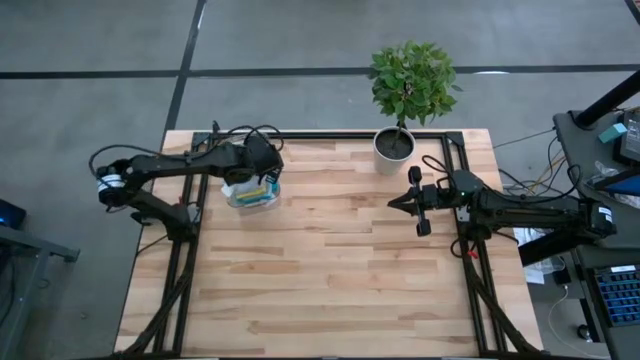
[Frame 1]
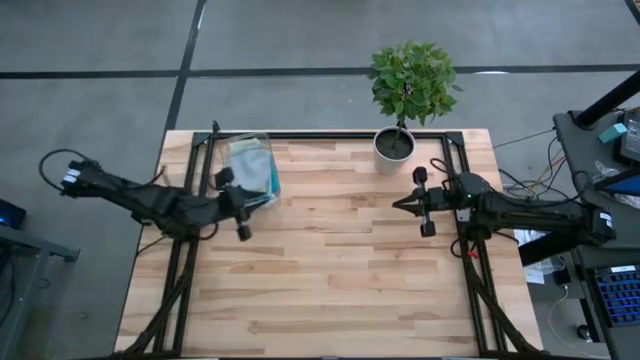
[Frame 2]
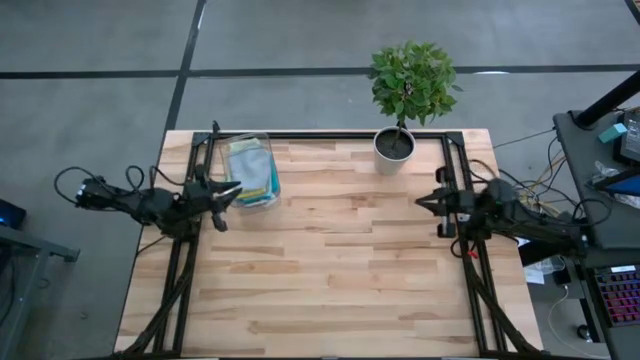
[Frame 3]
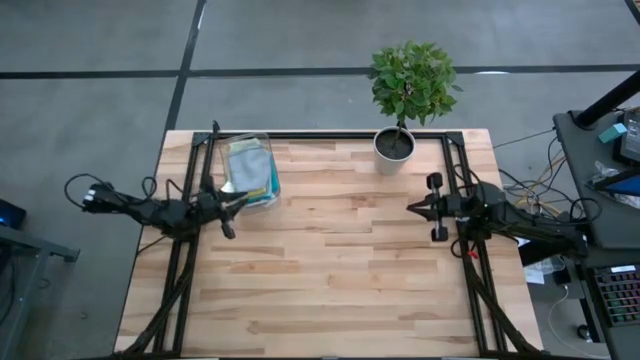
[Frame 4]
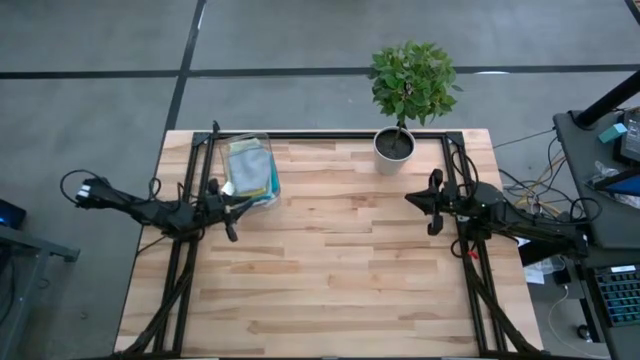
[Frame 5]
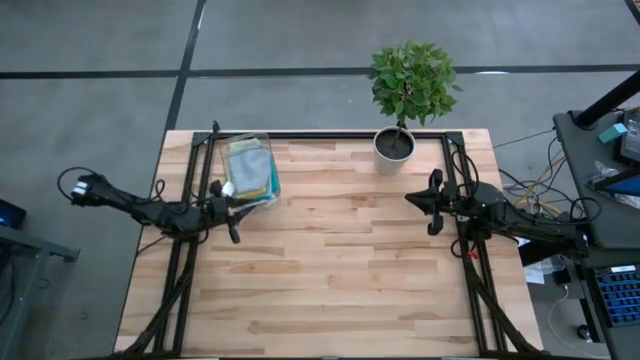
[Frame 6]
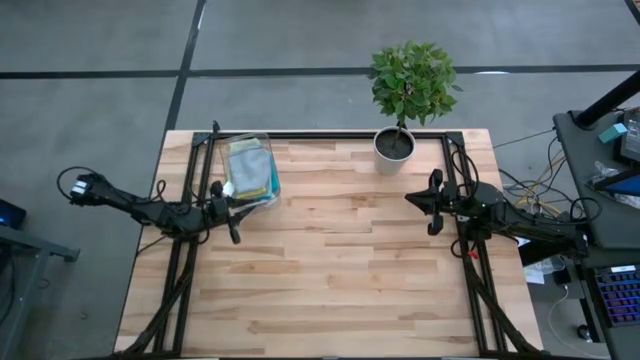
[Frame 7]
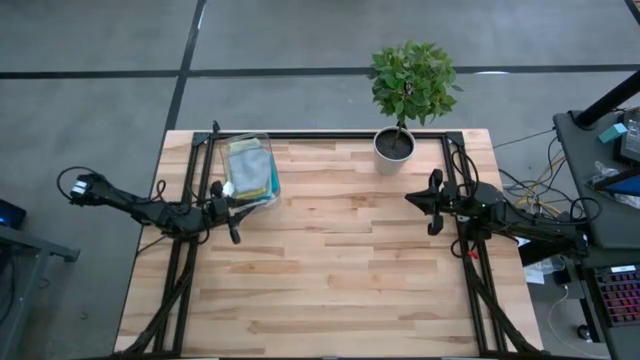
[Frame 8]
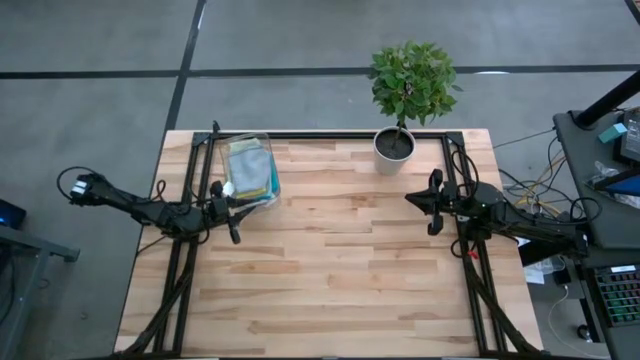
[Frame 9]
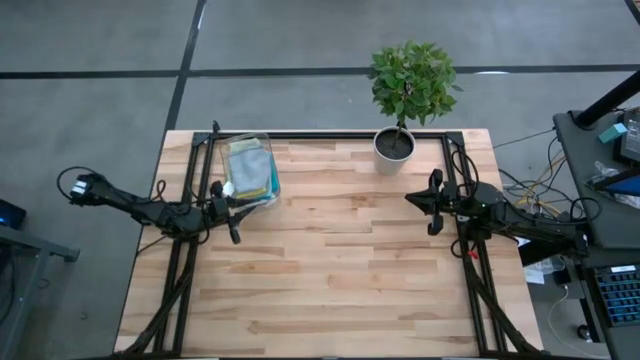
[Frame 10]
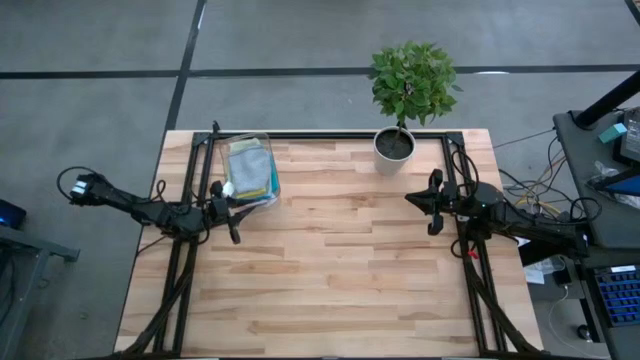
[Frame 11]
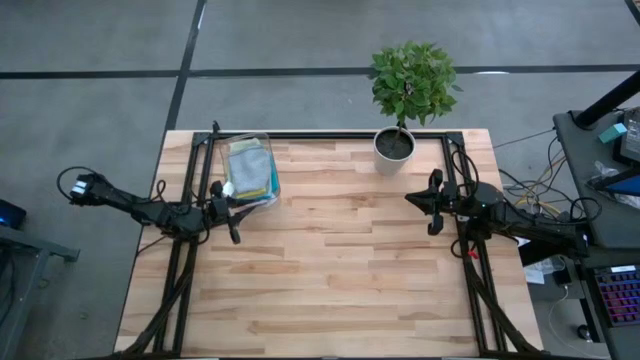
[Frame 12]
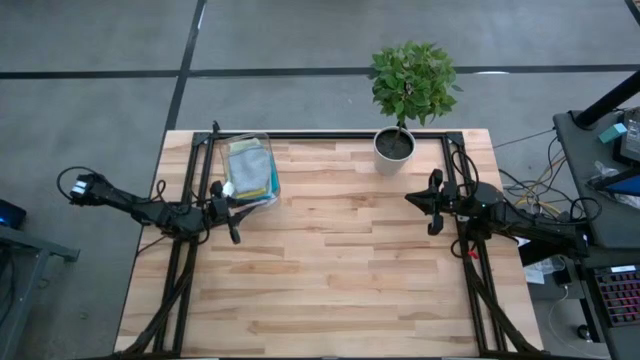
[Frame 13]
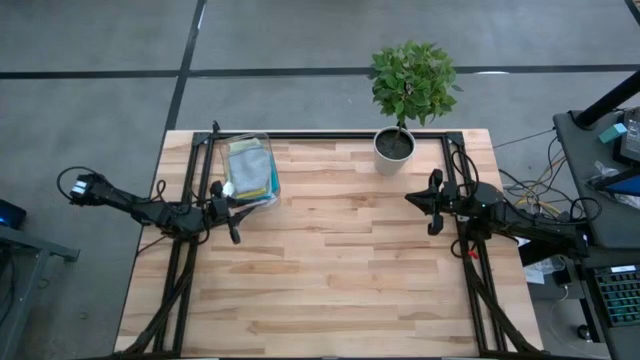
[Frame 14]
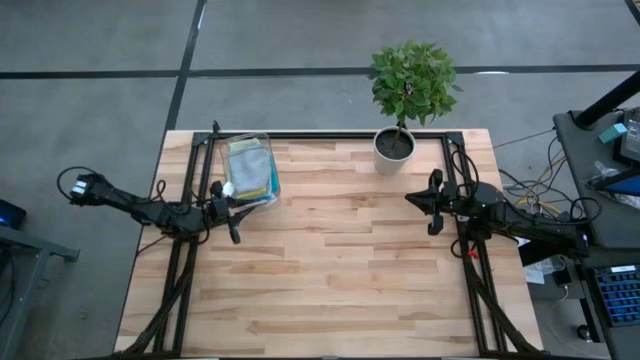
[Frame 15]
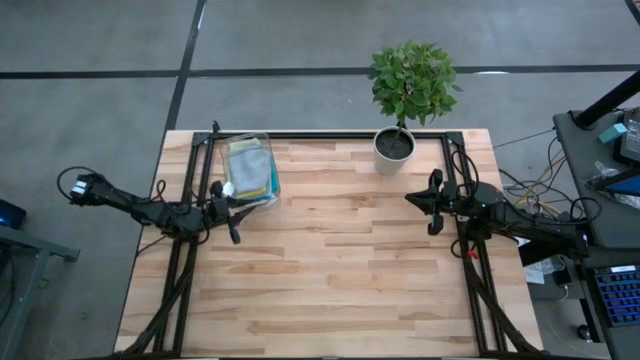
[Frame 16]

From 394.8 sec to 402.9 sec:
Task: Fold microfiber towels
Return to Home Position

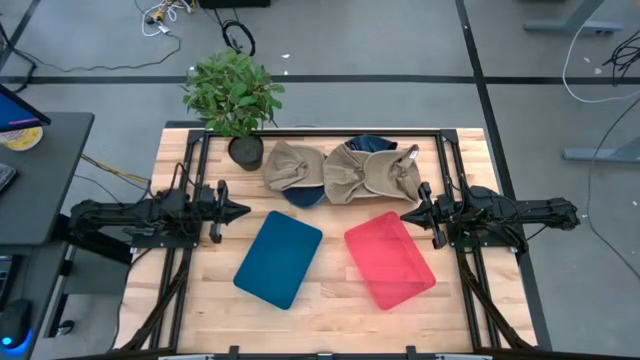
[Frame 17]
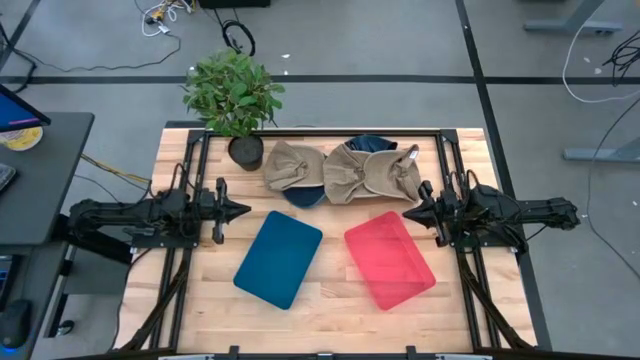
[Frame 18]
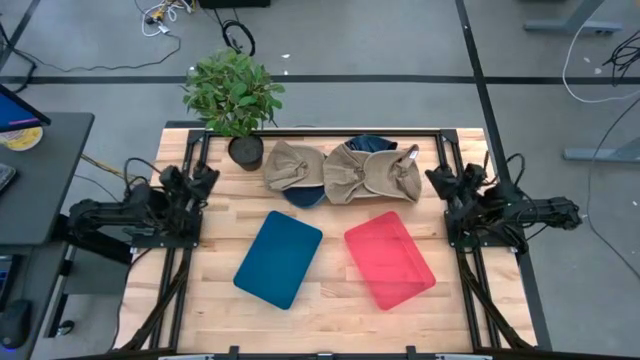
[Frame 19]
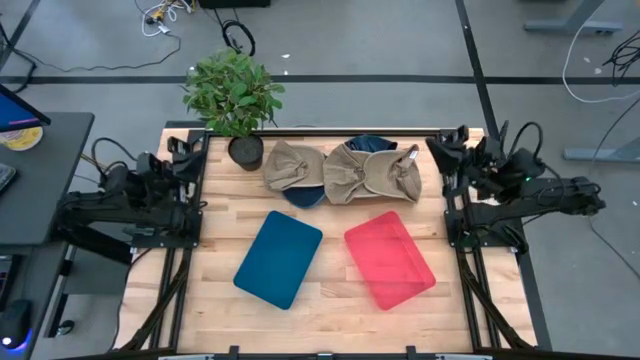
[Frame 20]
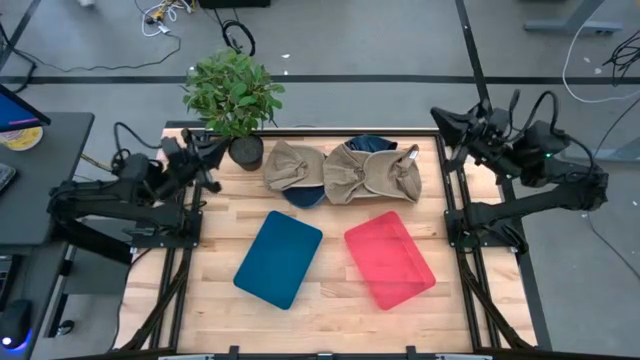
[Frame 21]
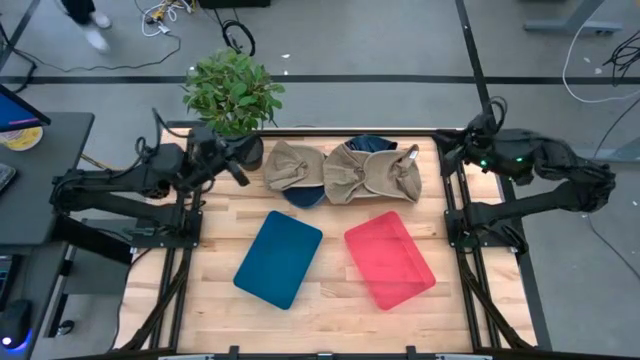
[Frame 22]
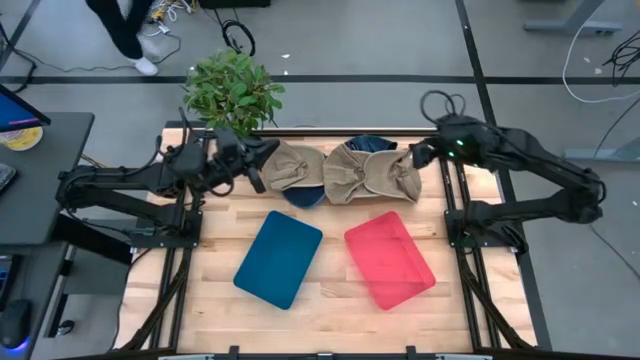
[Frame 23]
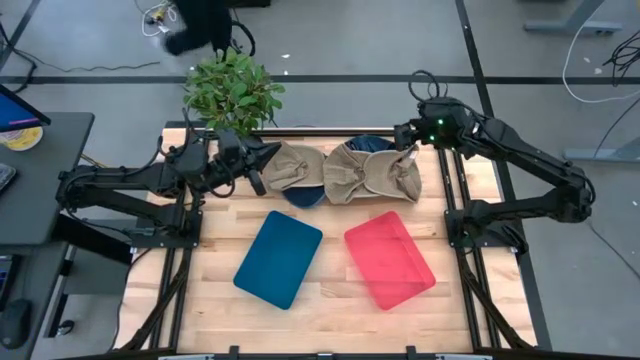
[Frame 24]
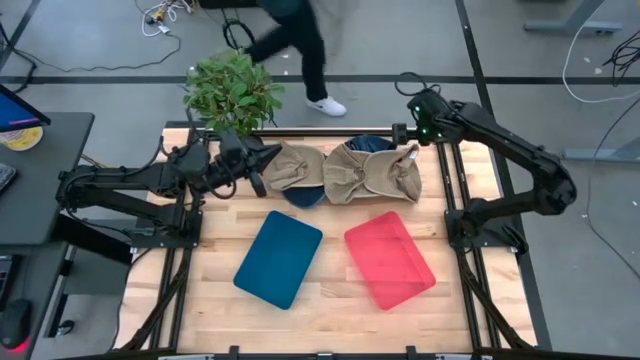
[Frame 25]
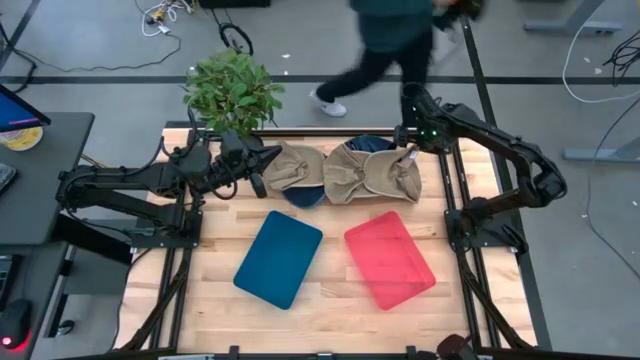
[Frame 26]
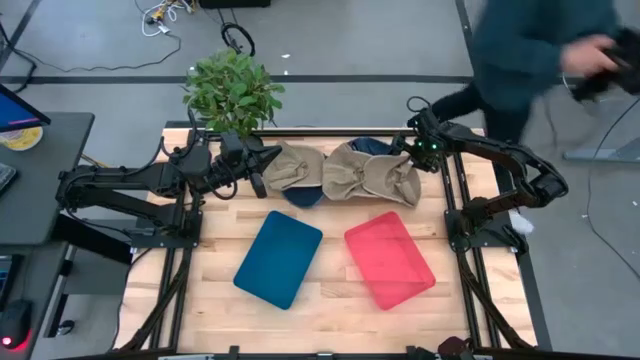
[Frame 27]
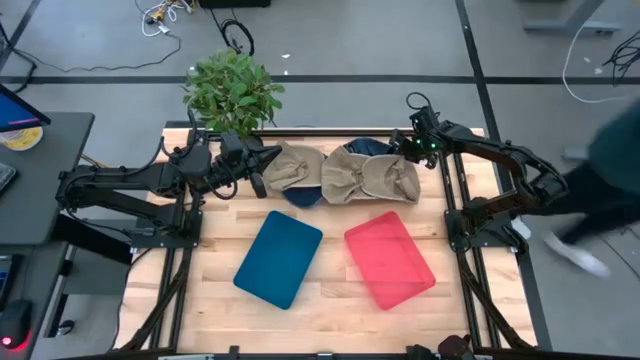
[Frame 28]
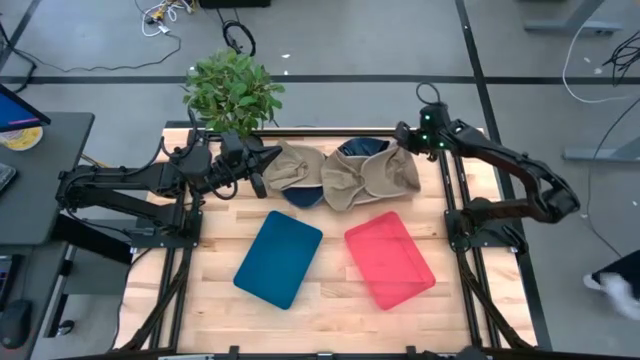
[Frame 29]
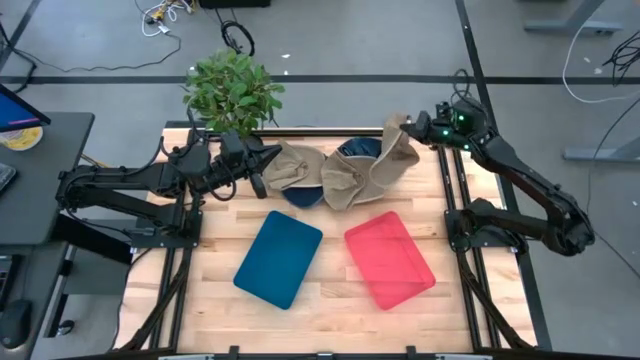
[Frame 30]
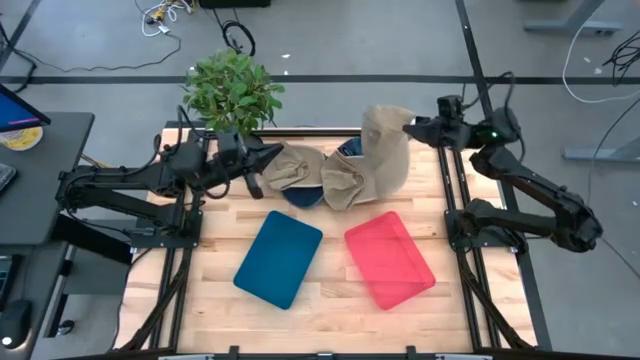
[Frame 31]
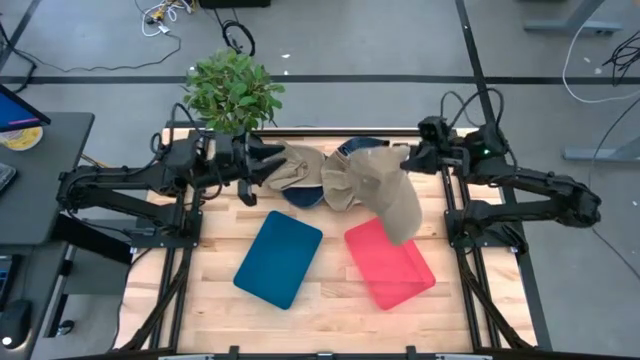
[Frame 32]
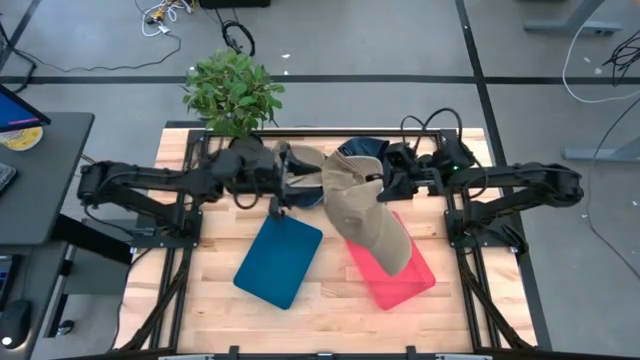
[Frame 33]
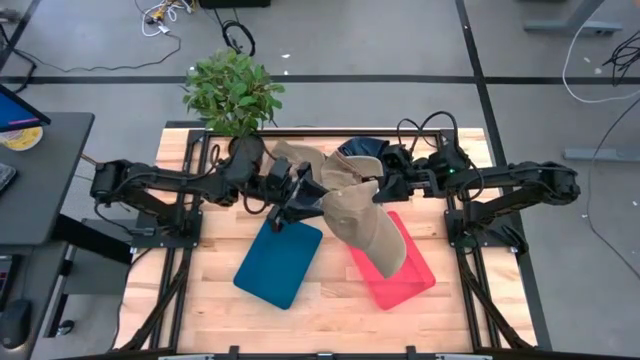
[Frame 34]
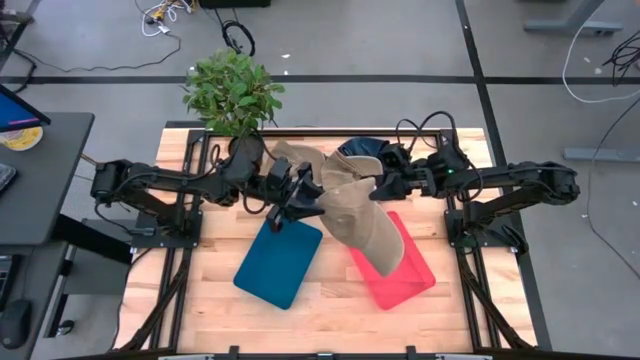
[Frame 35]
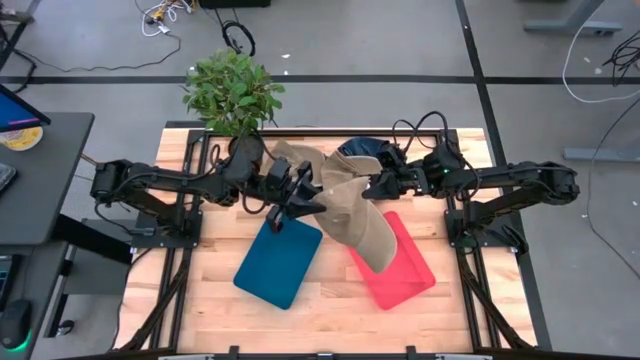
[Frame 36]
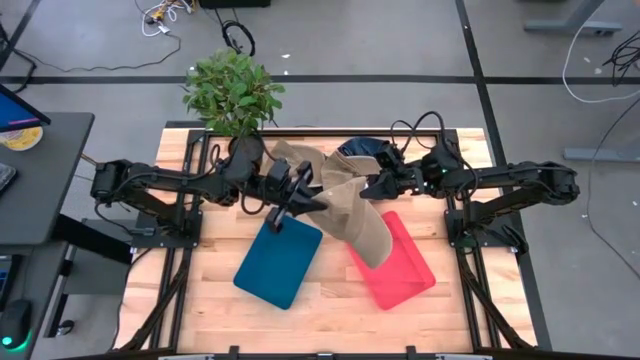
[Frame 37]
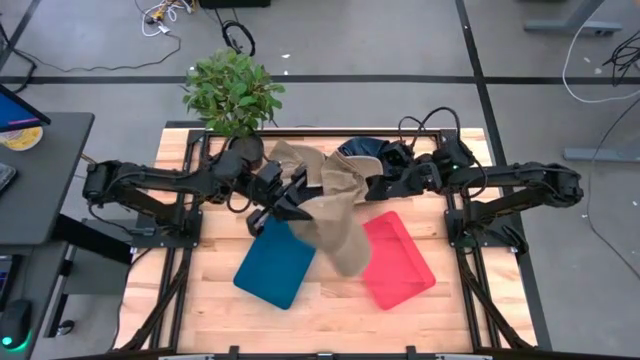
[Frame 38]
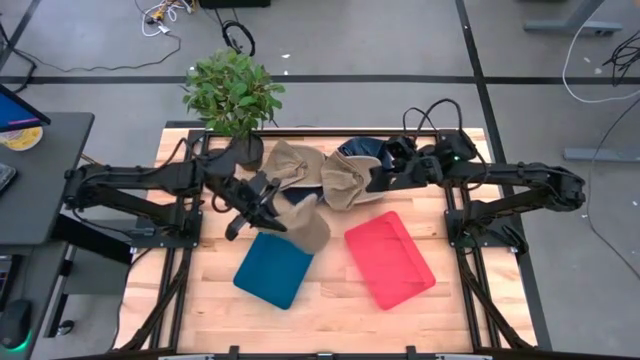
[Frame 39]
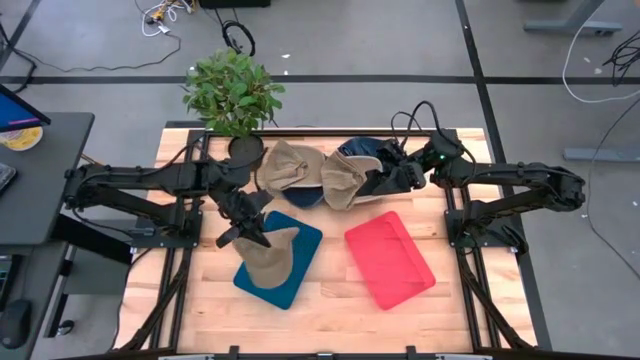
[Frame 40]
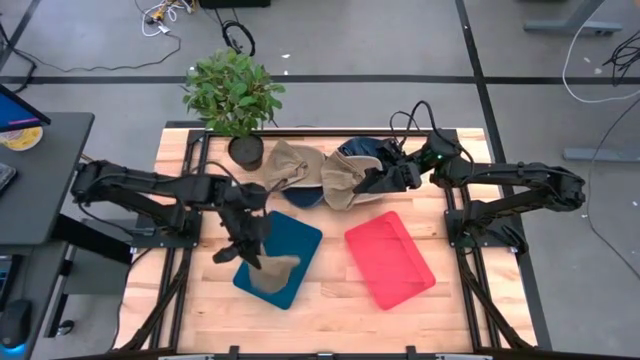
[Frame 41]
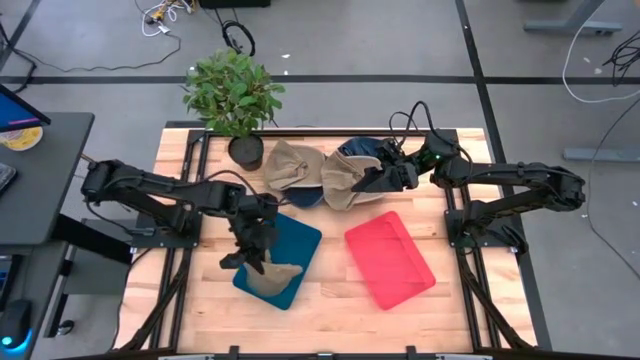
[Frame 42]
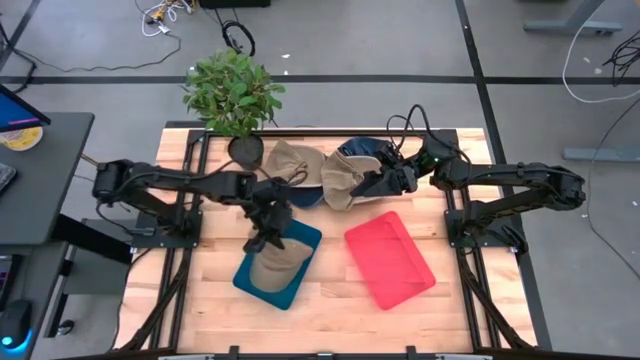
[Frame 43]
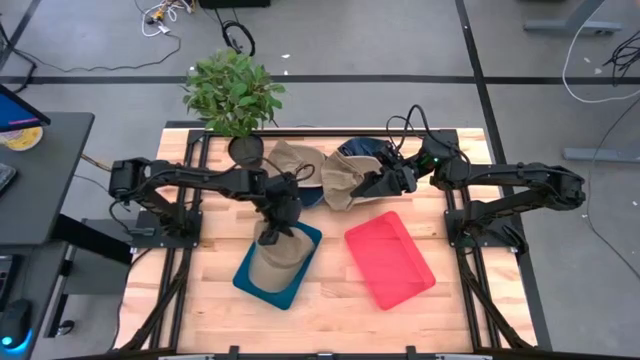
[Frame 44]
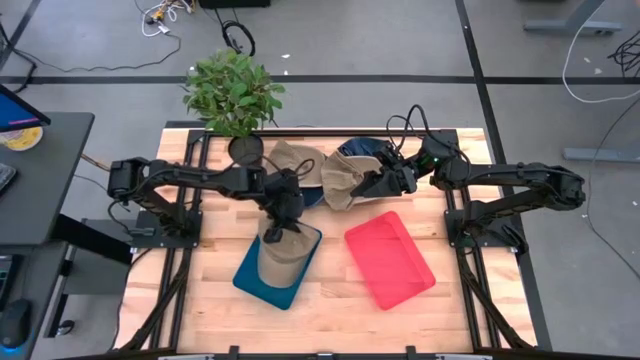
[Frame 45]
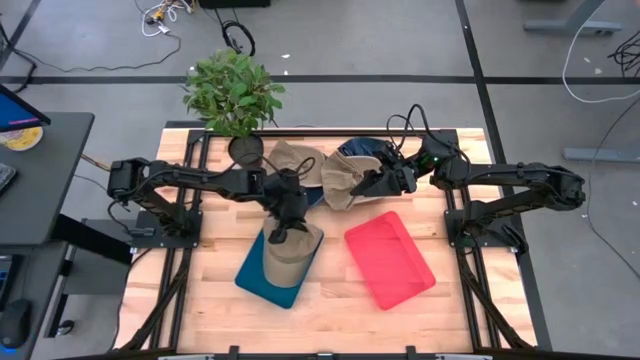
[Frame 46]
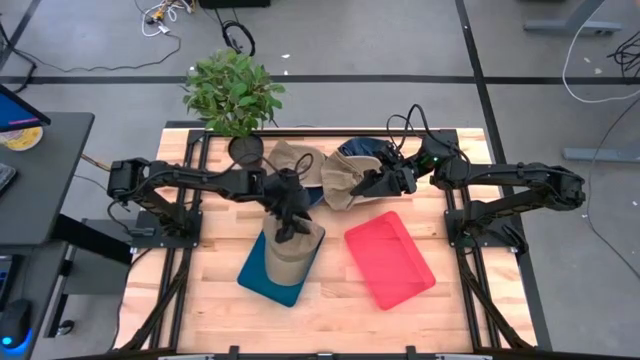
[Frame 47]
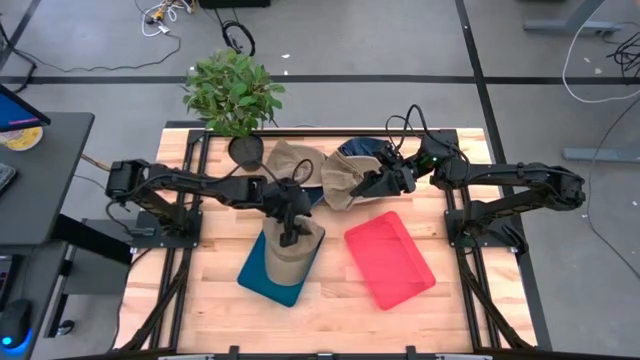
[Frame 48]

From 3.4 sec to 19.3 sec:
Task: Pick & Place hat
Put the brown cap into the blue bin
